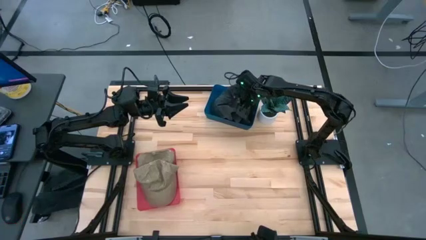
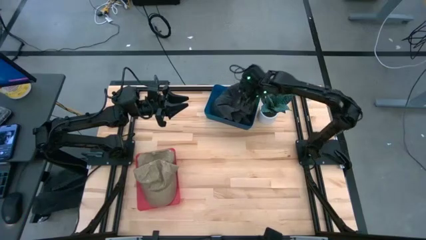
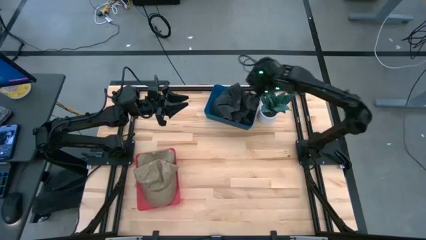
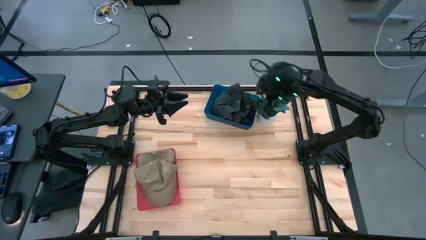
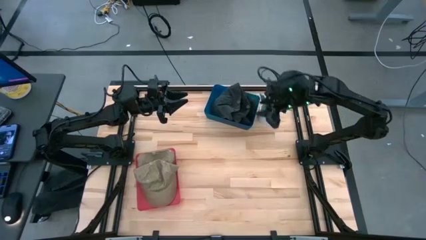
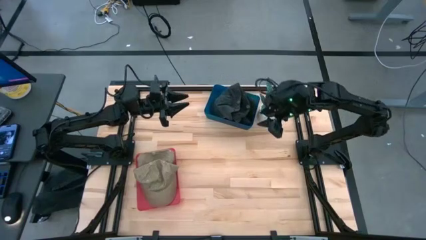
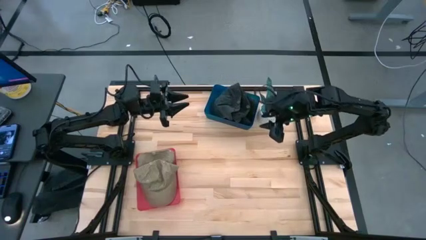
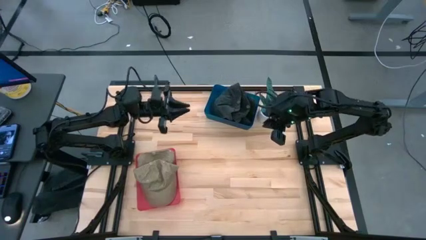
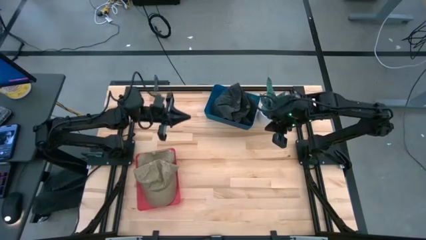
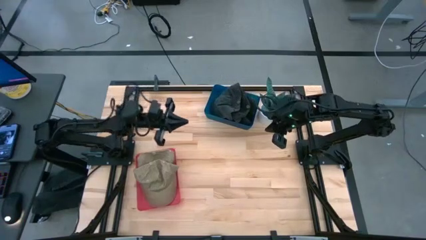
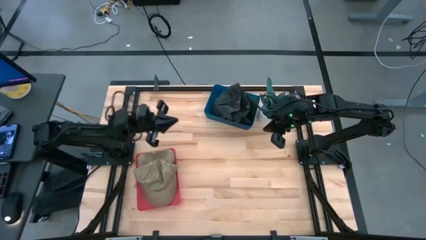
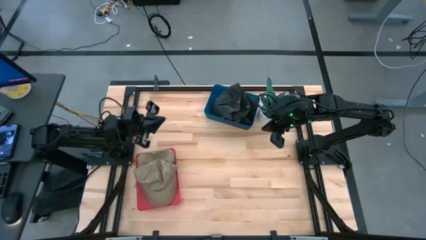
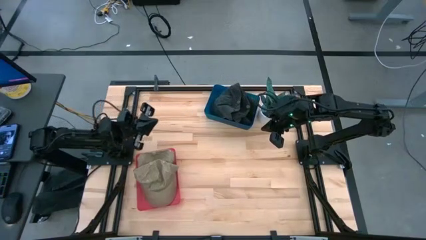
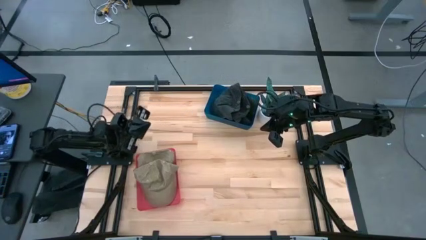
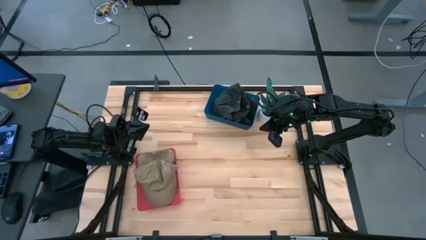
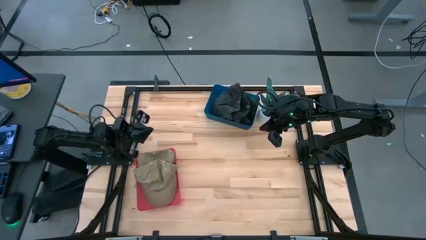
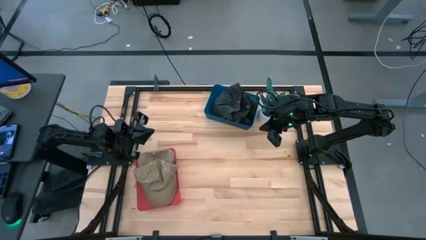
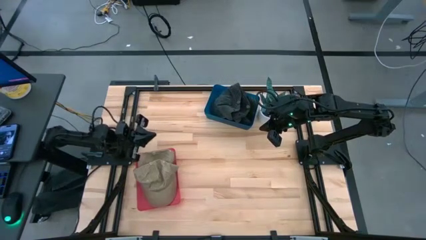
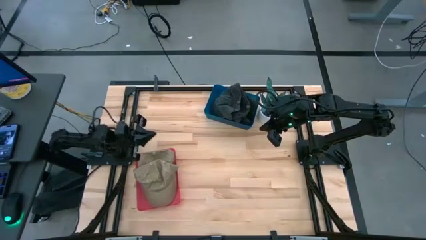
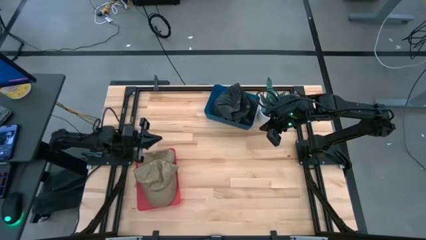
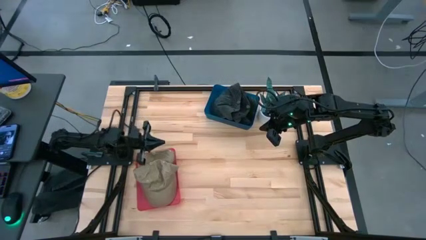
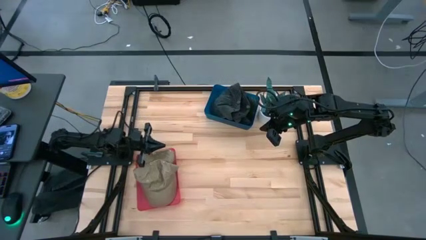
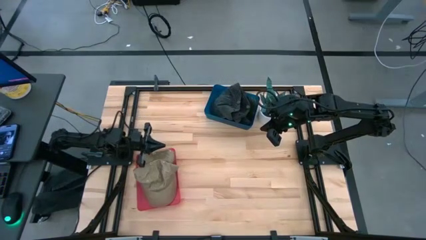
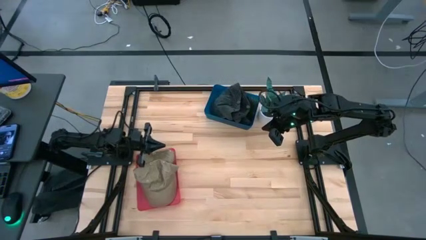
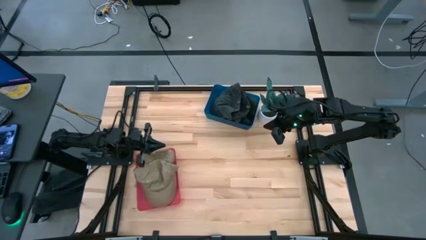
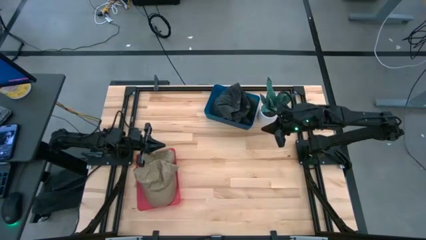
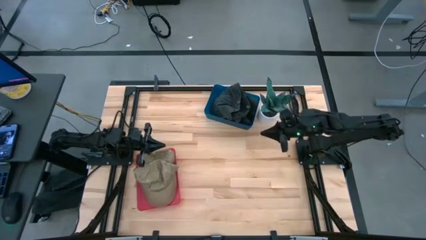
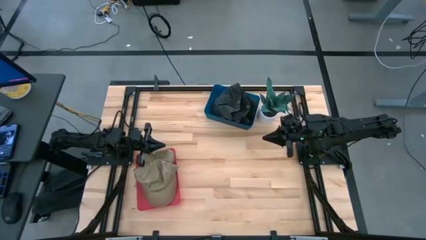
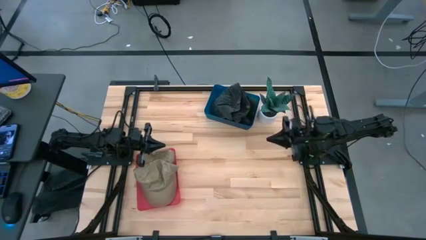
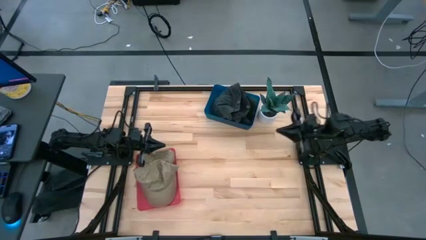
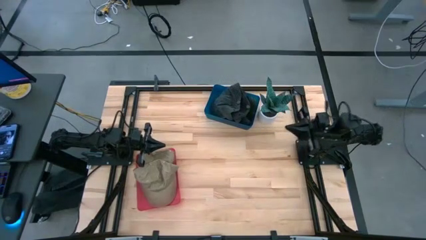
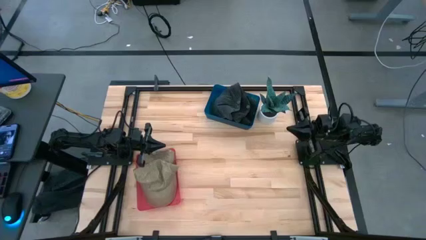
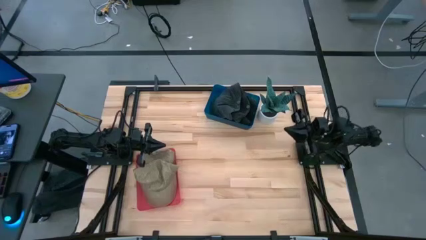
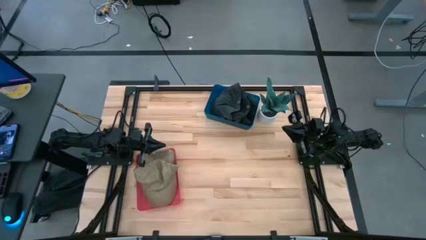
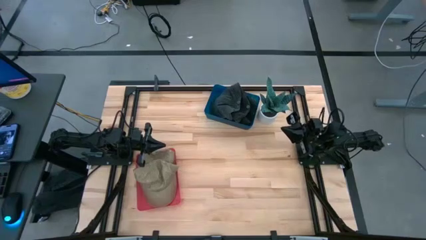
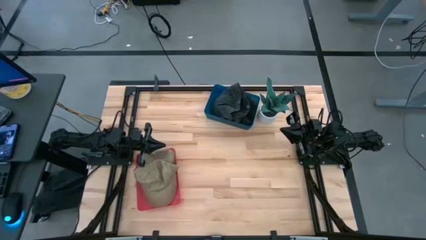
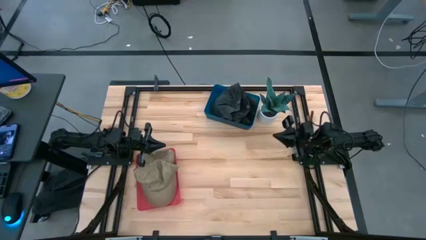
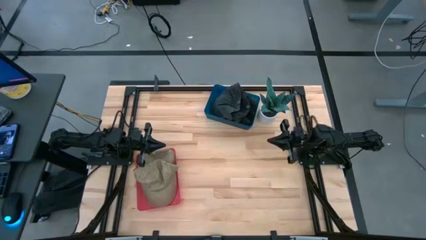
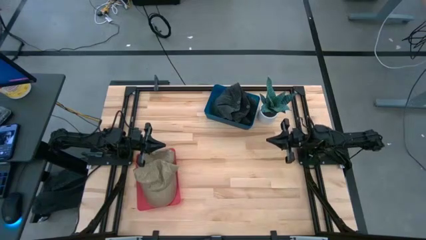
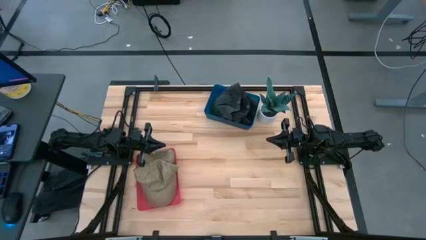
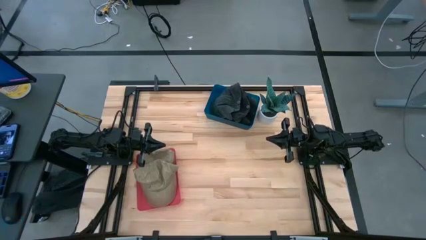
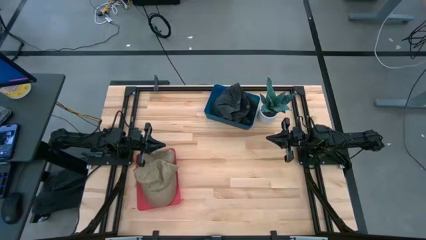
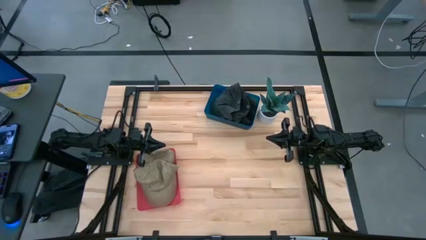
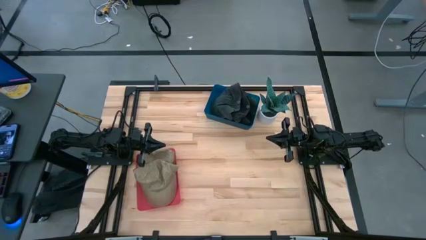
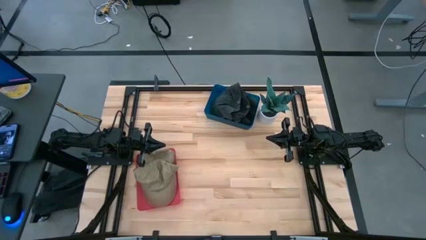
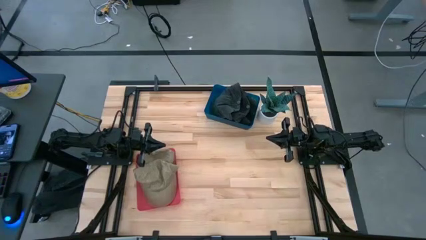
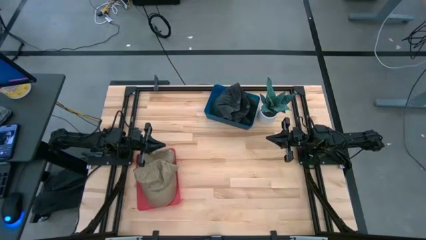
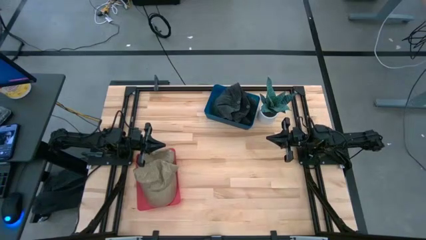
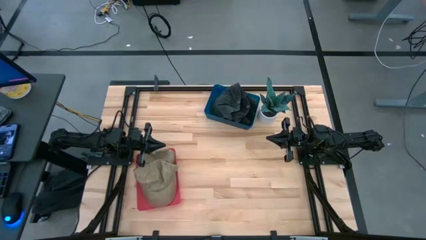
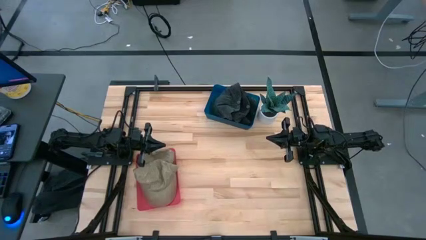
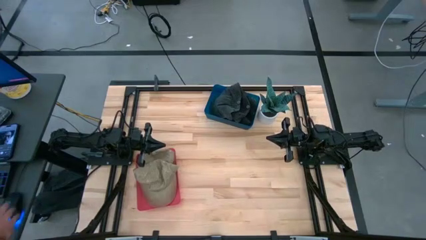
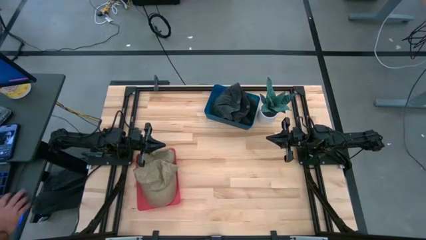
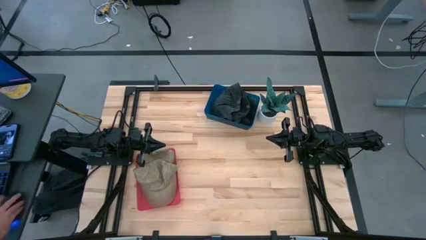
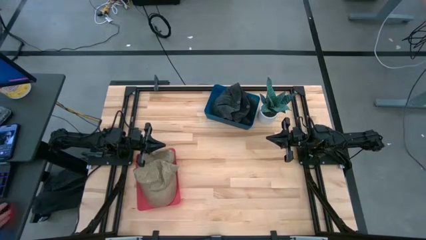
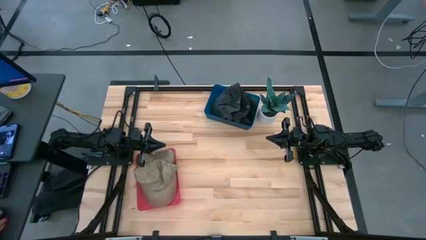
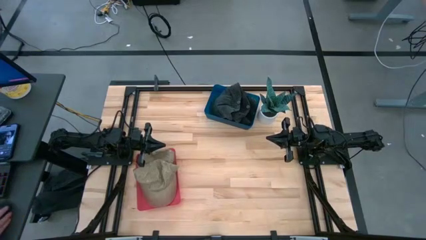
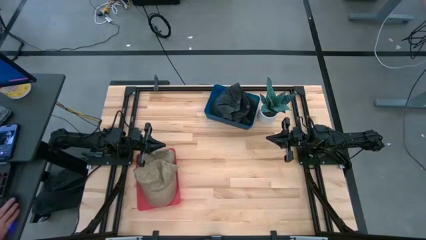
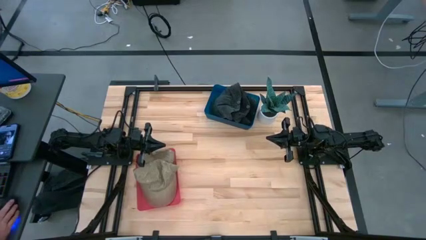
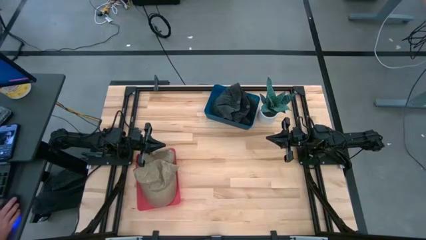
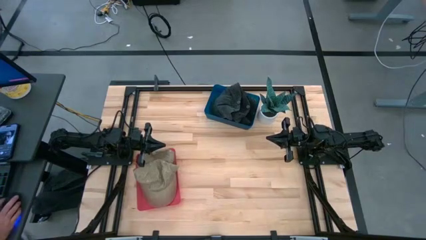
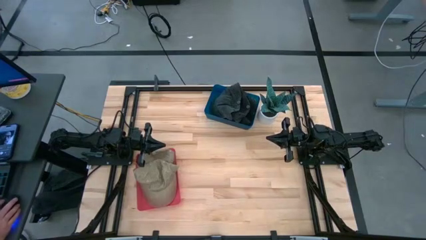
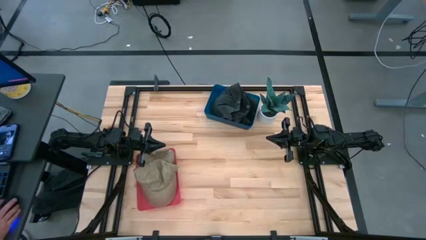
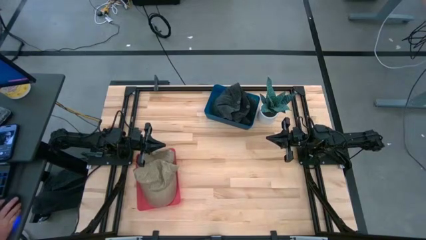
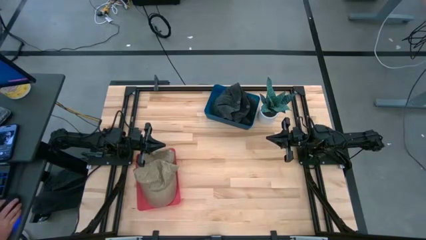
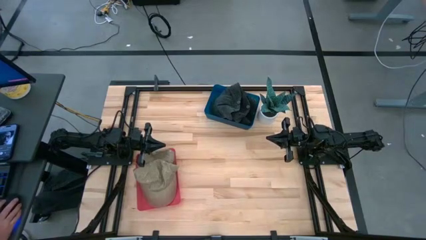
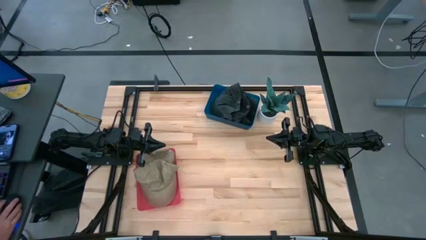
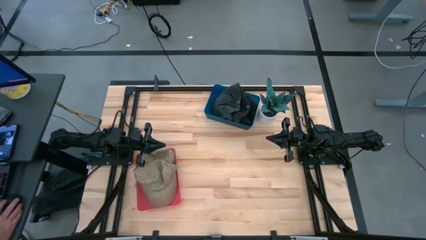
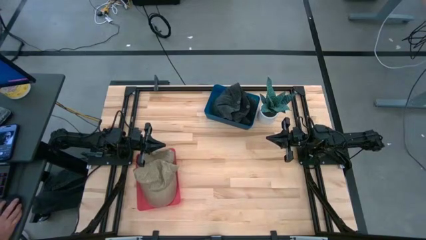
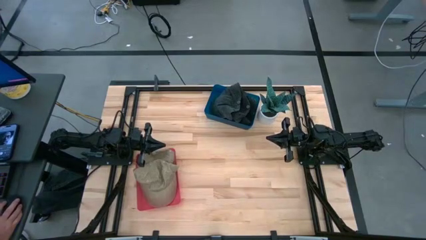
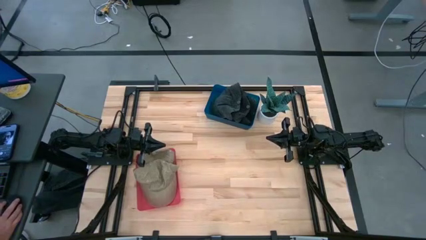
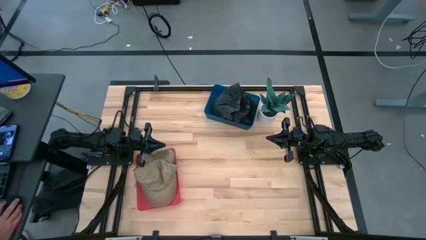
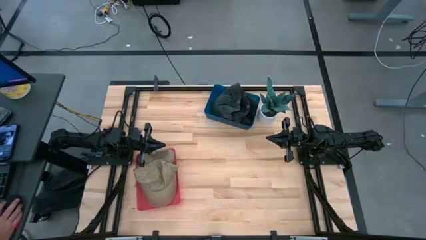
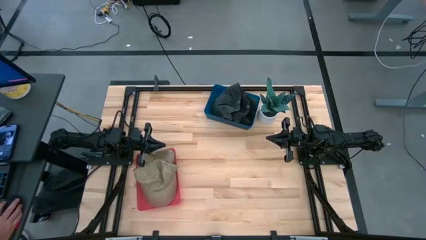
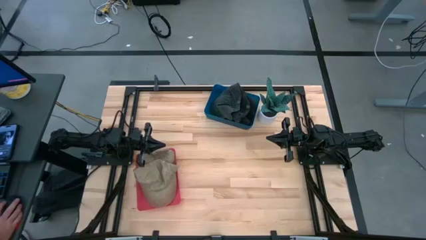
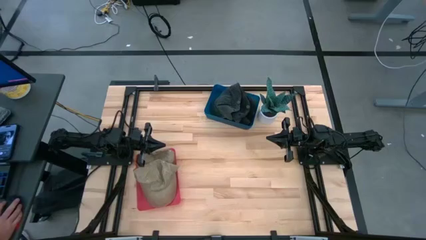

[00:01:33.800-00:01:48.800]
Task: Pick & Place hat
Return to Home Position

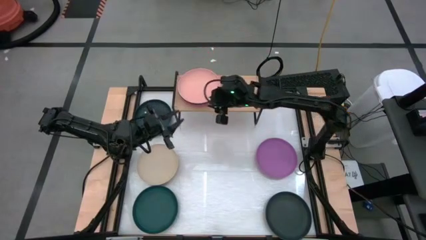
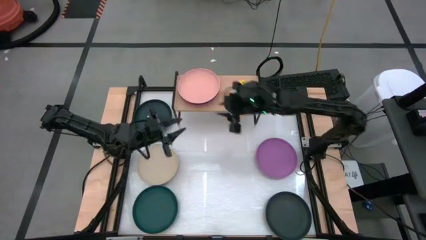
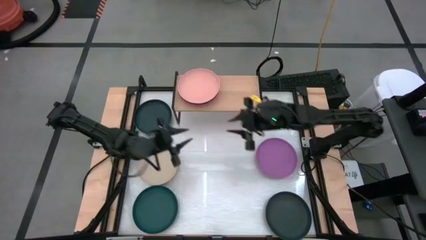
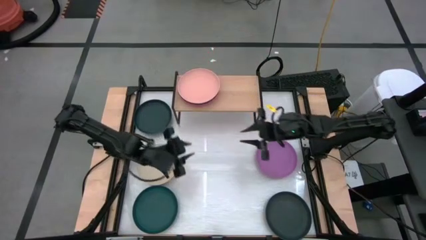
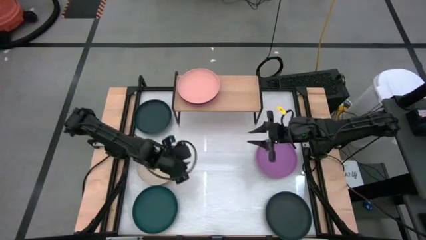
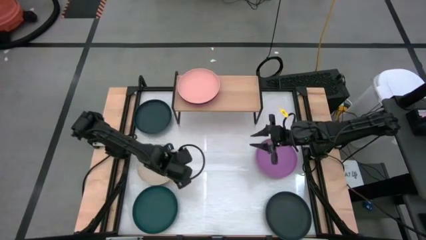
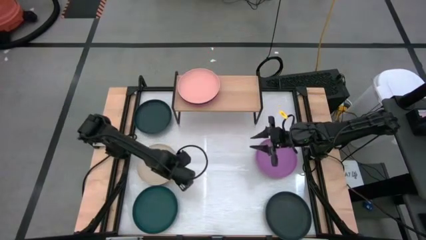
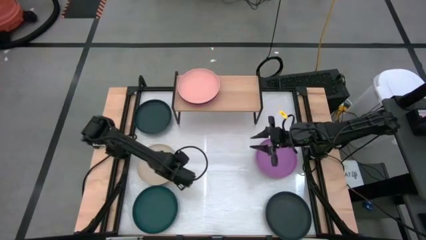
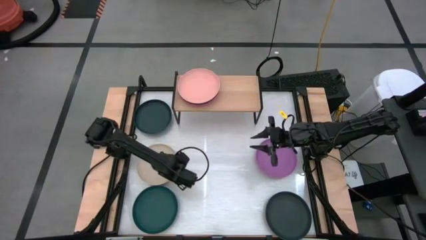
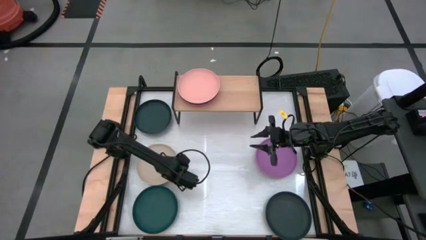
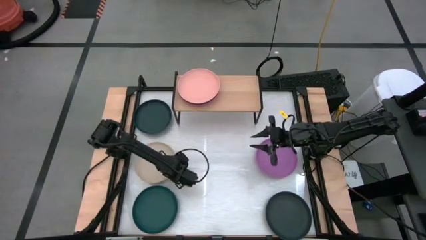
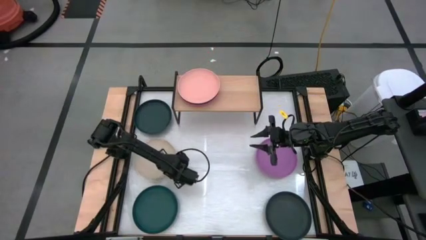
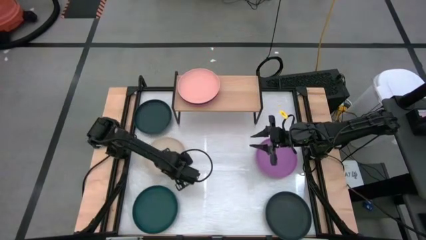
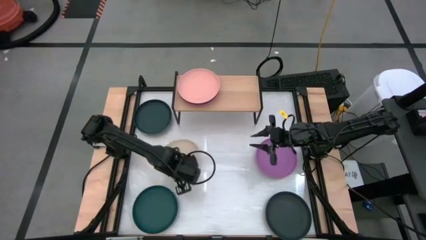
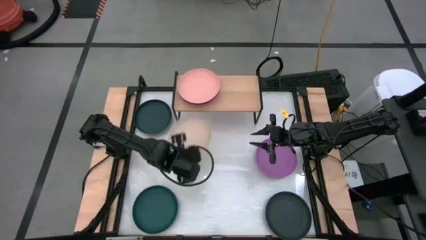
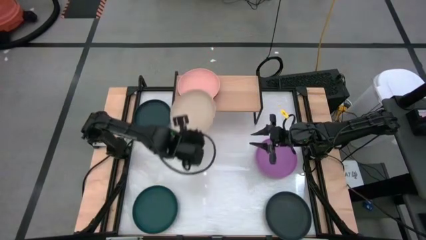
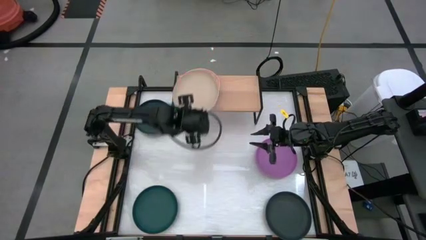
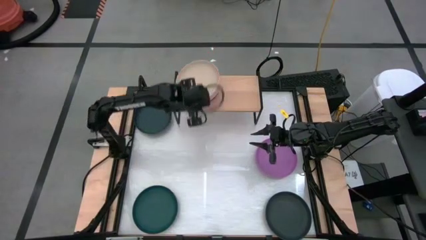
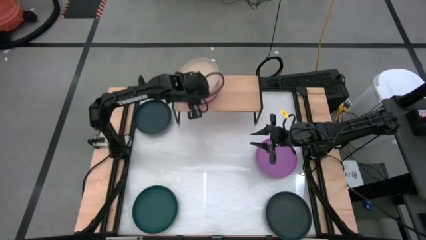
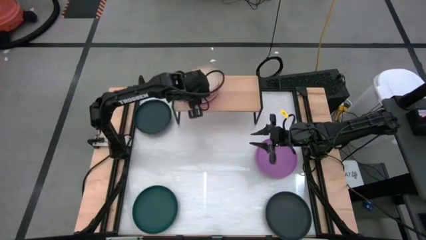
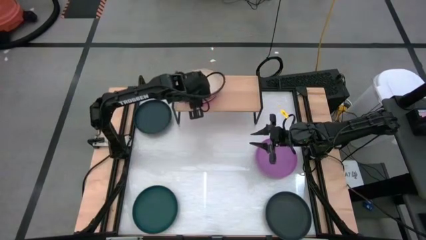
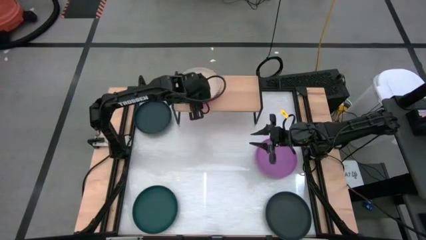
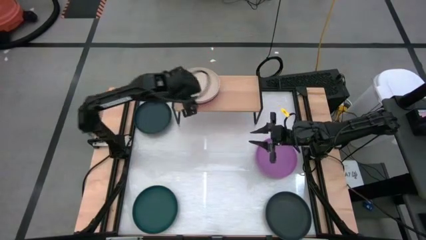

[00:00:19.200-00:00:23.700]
Task: Place and stack plates onto a shelf
Stack the gray plate on top of the light brown plate on the shelf
